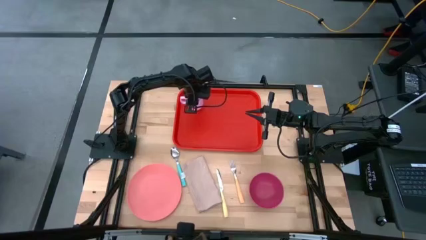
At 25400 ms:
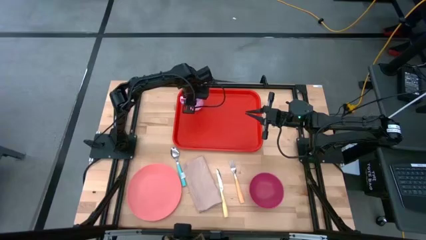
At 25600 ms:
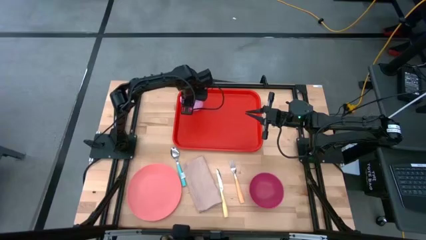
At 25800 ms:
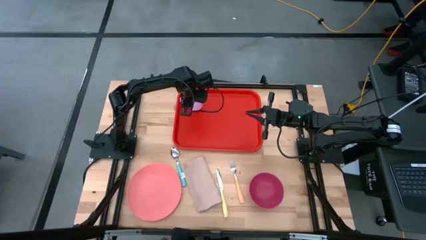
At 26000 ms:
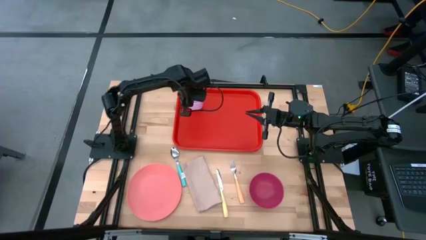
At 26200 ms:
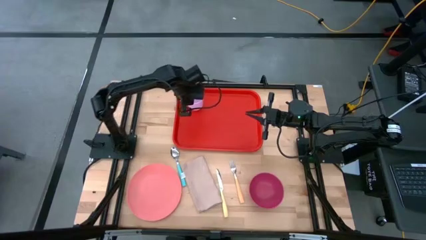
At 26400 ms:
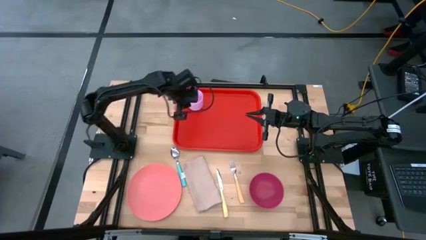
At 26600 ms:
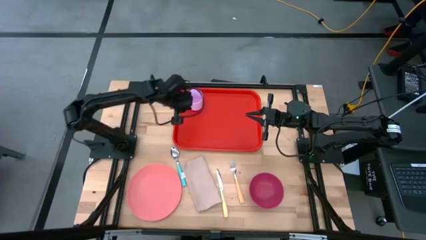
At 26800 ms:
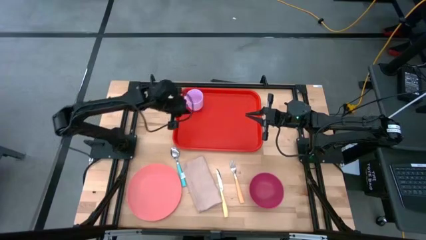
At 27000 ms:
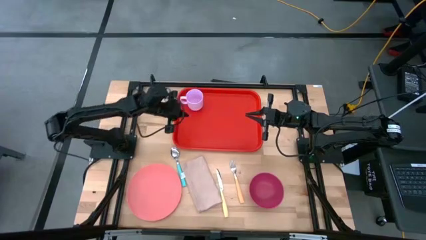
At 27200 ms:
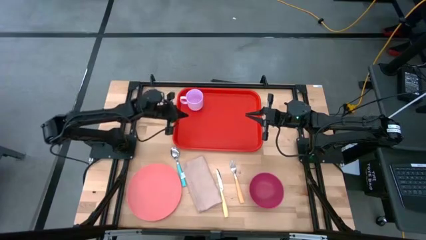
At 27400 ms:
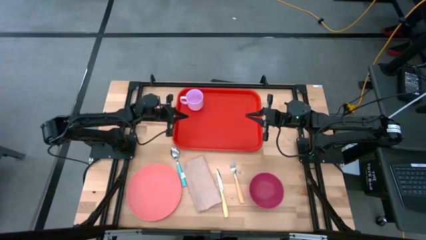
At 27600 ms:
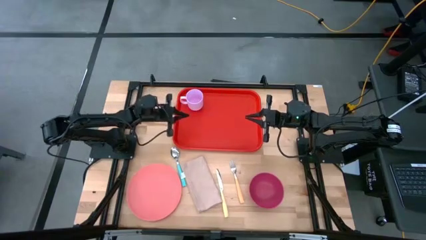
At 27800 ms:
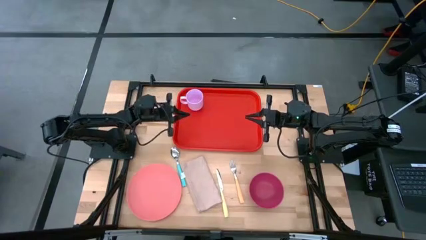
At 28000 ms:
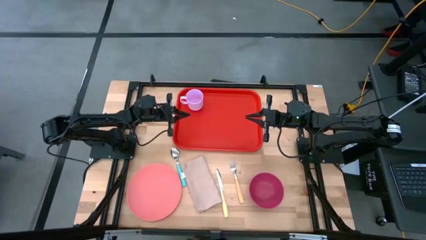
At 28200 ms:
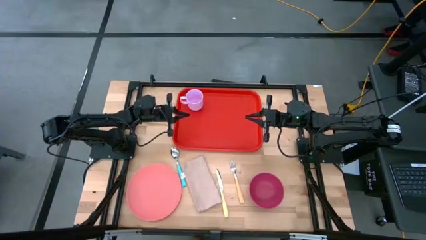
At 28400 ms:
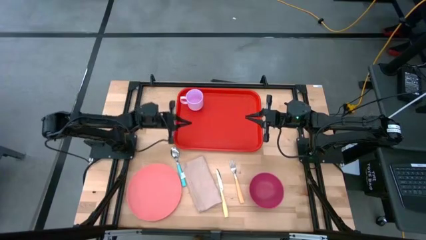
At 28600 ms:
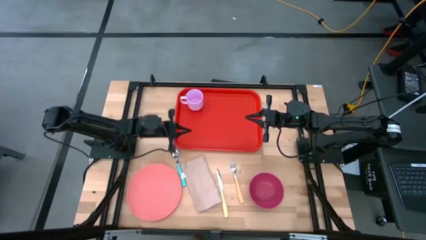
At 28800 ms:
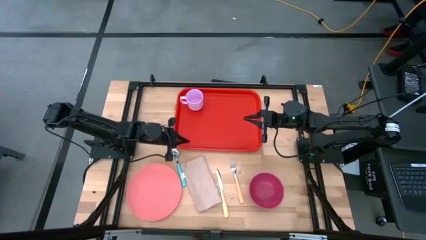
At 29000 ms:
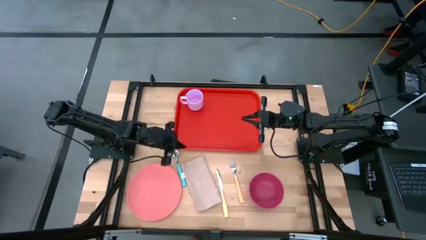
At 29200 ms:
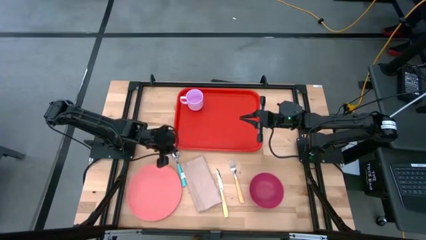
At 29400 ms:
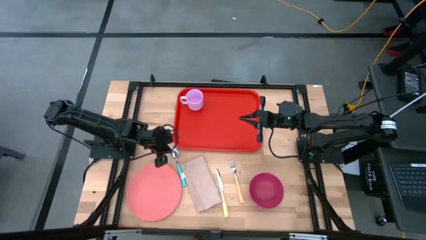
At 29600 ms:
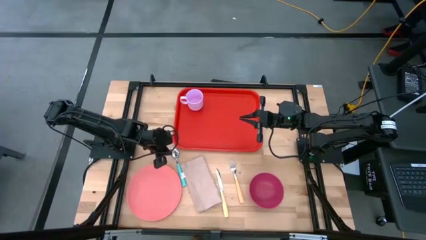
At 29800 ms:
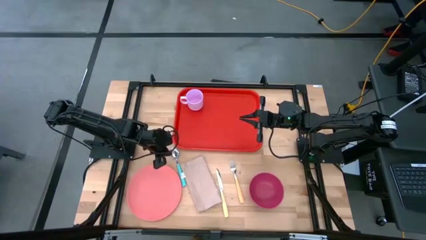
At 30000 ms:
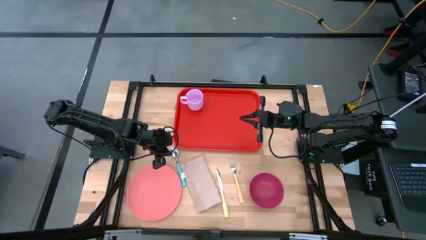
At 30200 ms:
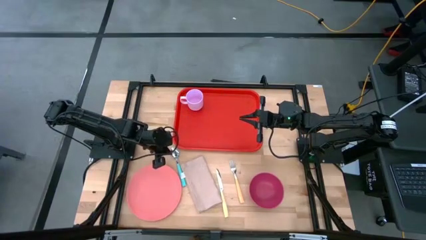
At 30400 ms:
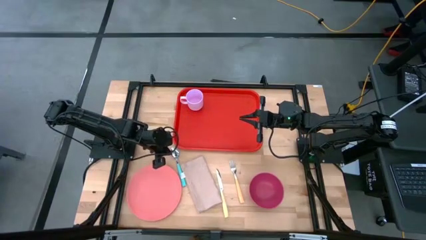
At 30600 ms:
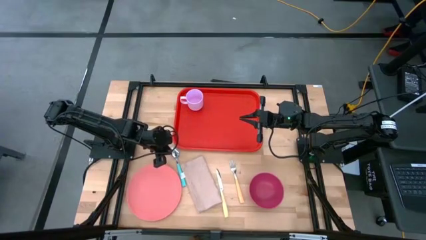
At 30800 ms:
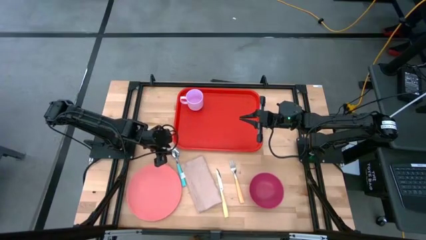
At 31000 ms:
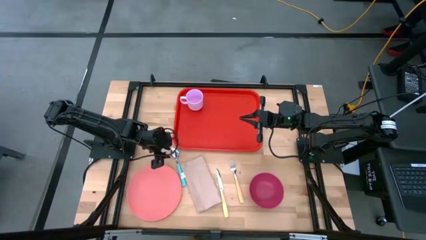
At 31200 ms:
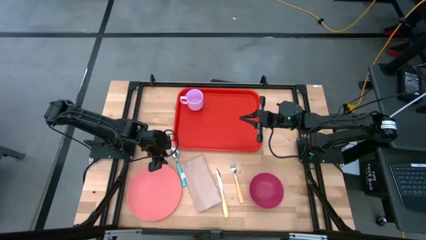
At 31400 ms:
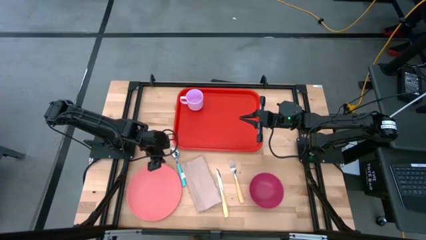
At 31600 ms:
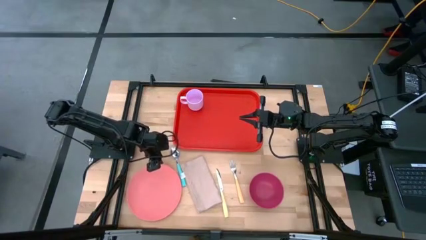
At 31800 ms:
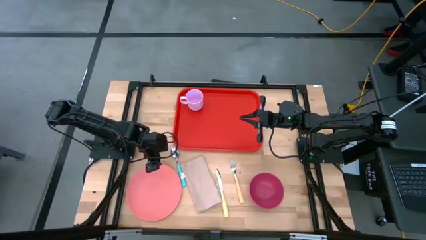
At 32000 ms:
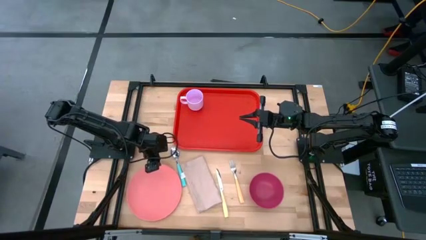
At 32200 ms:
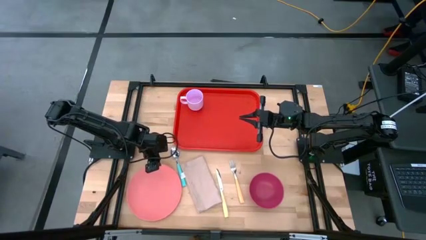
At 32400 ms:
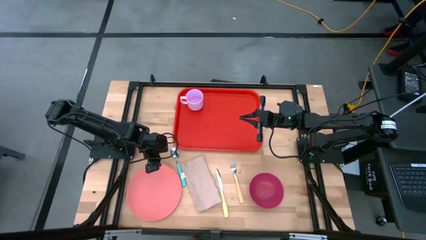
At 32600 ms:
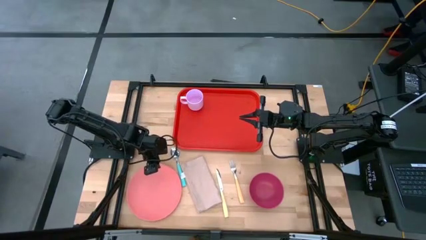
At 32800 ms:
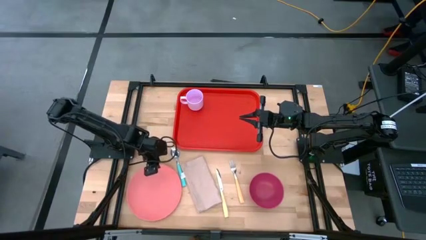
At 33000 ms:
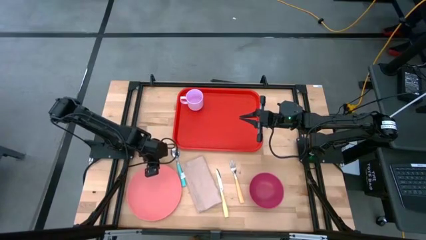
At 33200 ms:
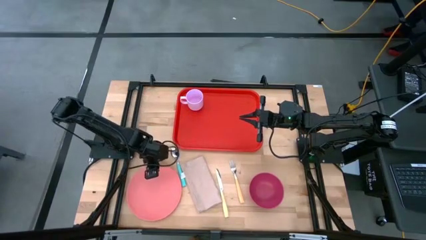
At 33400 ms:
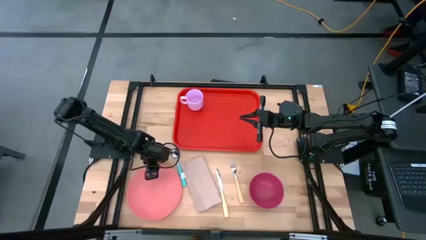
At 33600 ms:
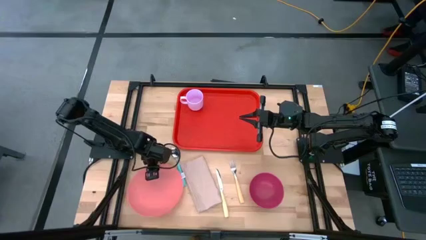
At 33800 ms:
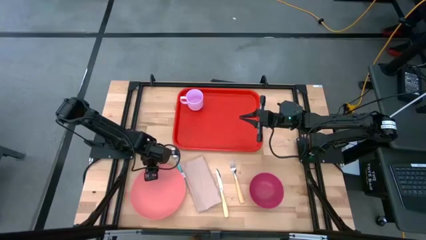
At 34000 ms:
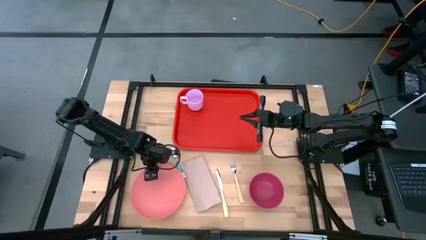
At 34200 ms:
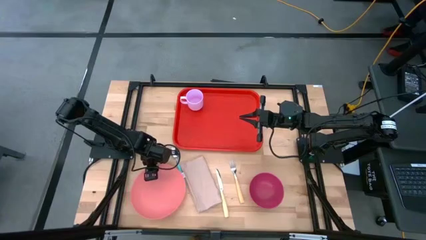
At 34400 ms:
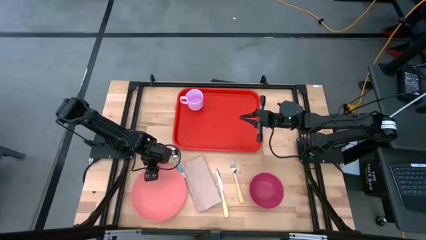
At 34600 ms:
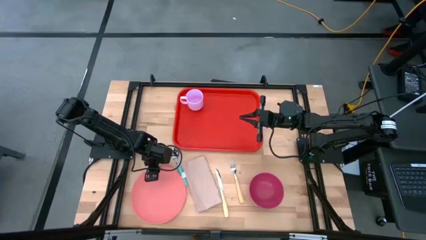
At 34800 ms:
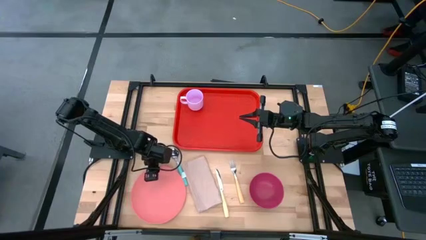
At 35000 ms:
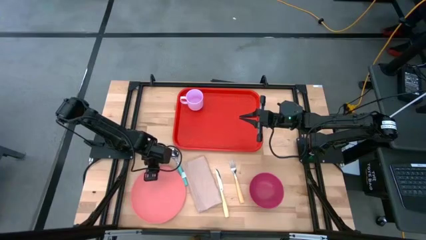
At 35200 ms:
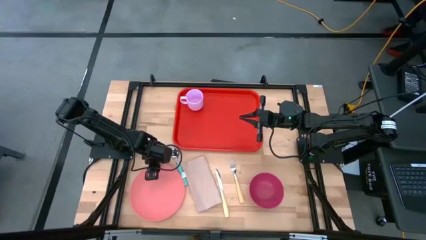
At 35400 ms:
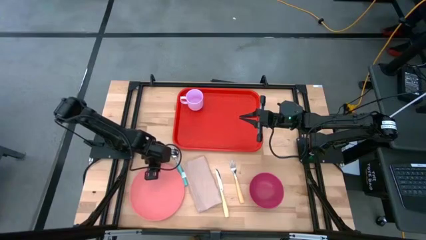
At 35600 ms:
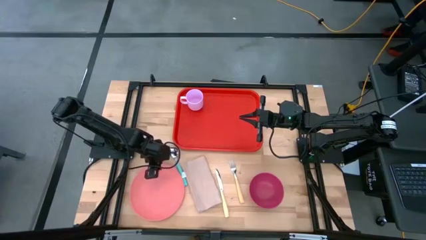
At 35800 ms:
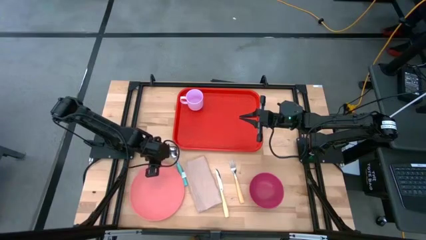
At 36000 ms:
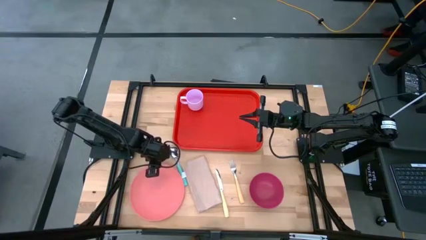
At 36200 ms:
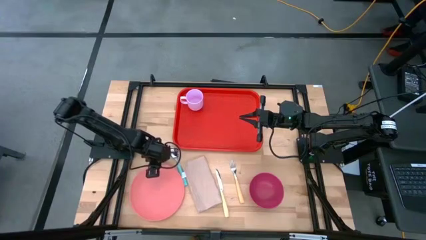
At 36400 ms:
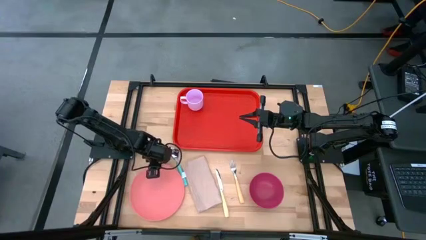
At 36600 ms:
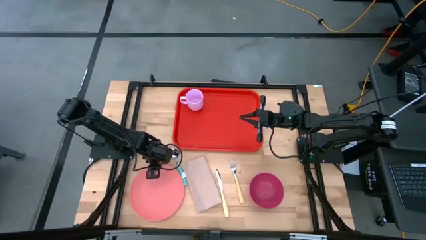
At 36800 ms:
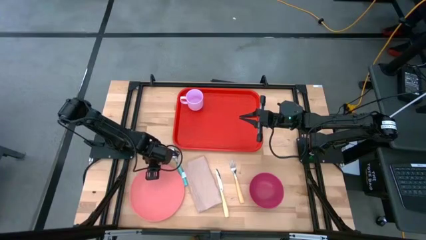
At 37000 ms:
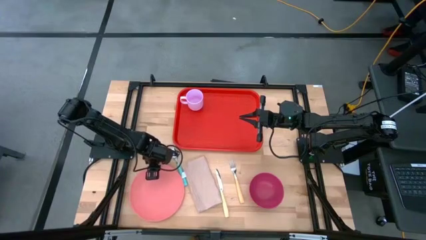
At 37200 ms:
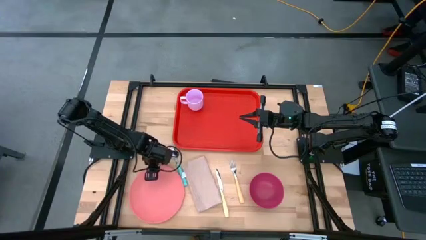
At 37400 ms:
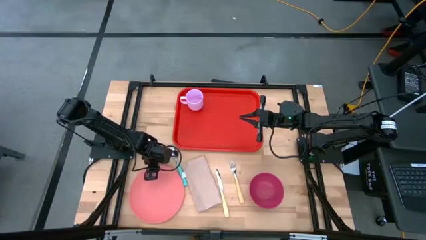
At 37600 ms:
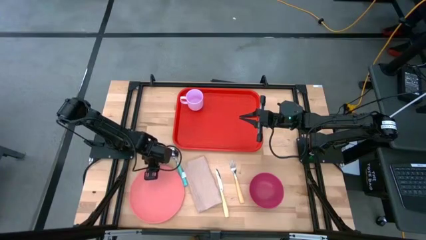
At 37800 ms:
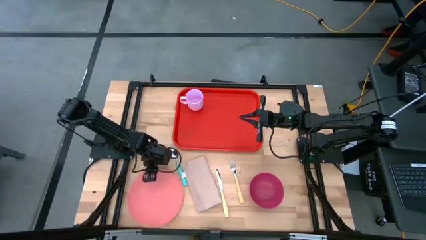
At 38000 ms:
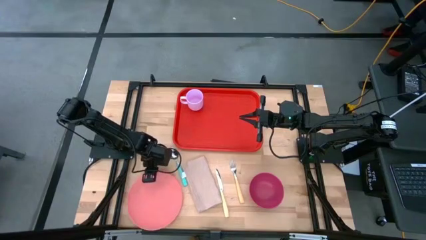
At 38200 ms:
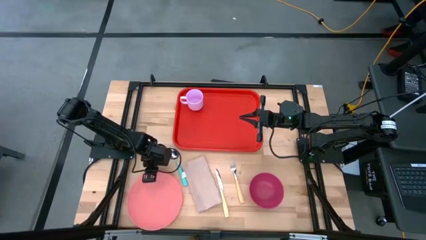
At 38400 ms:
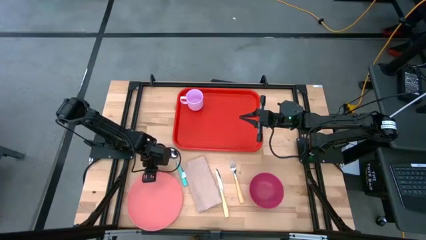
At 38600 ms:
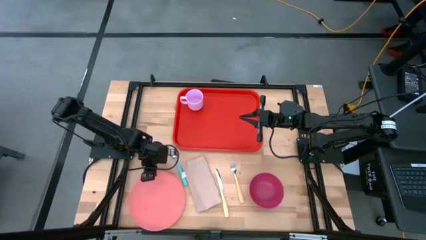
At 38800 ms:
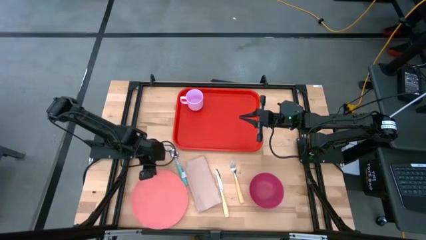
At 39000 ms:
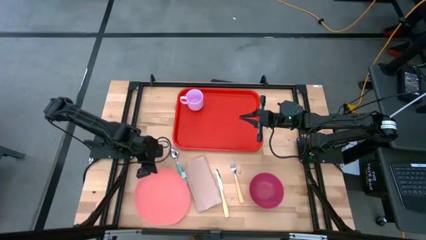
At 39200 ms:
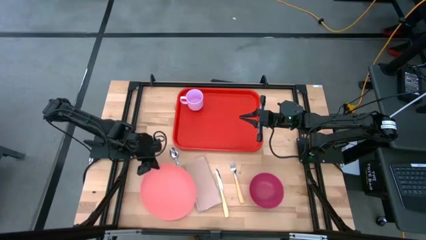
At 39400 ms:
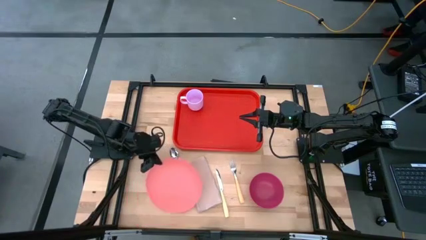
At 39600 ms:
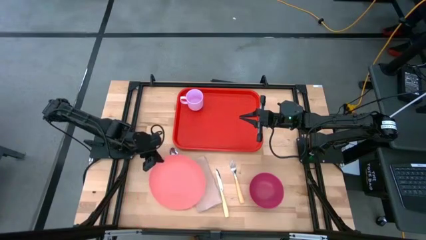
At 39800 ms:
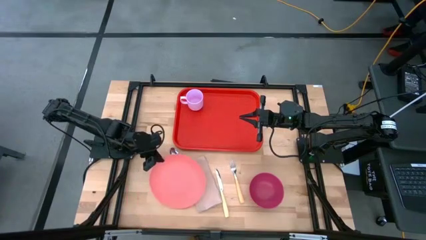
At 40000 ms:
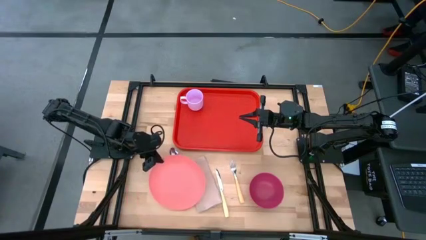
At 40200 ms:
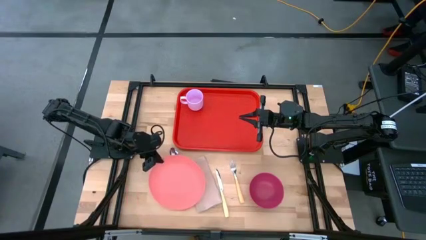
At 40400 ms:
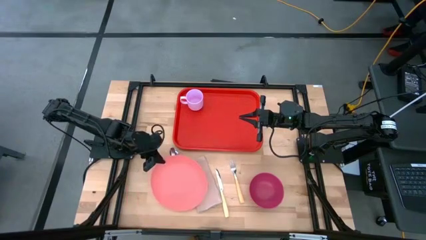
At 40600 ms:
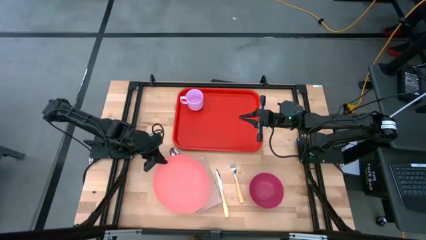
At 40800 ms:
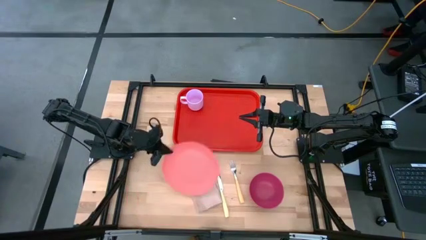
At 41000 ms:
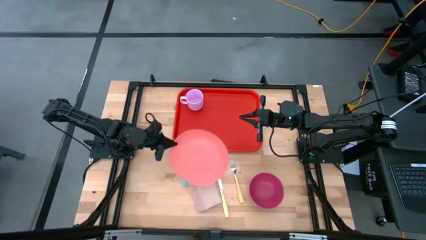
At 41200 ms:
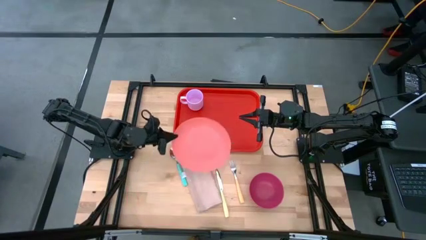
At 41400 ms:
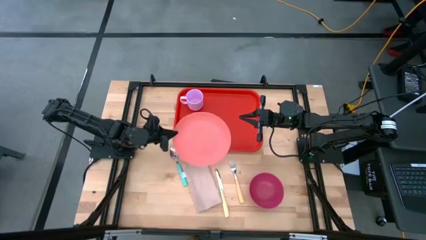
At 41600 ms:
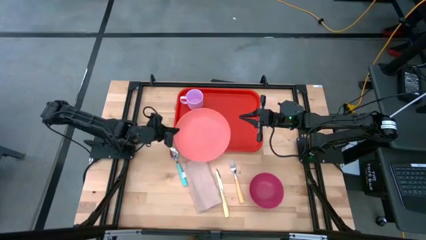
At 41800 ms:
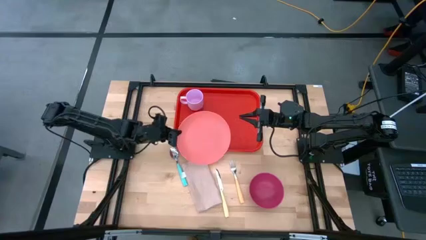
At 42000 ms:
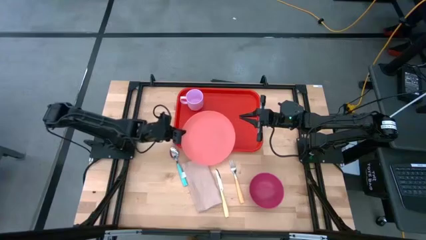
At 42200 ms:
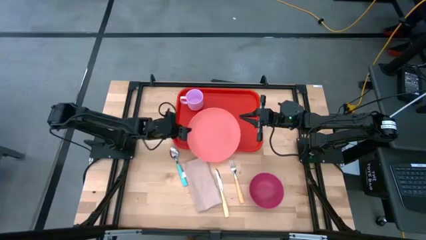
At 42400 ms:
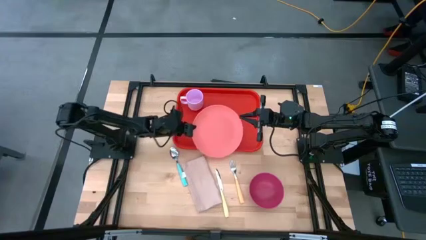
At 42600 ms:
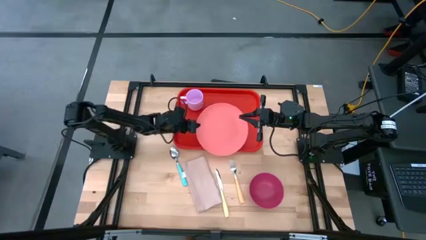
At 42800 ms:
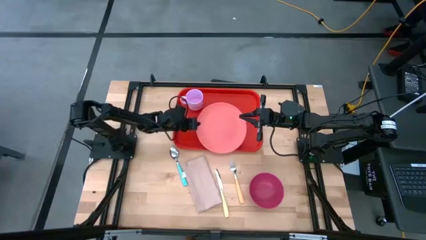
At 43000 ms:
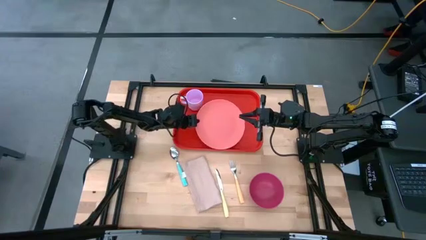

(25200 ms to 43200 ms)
Task: Set up tray
Put the light pink plate in the middle of the red tray
